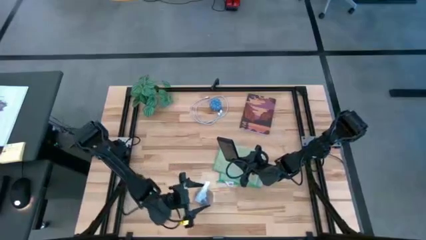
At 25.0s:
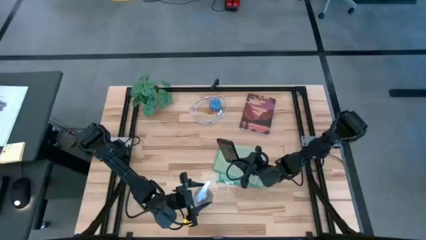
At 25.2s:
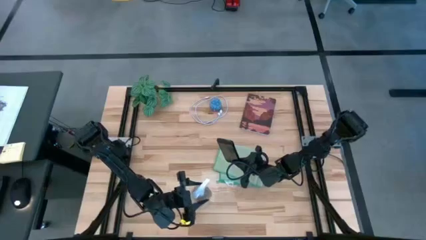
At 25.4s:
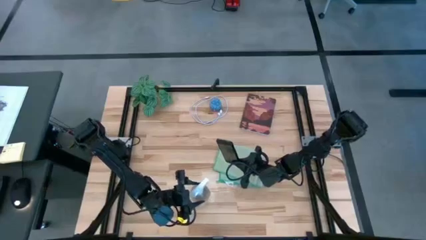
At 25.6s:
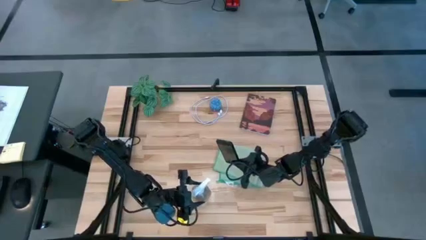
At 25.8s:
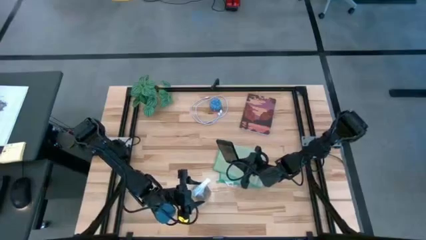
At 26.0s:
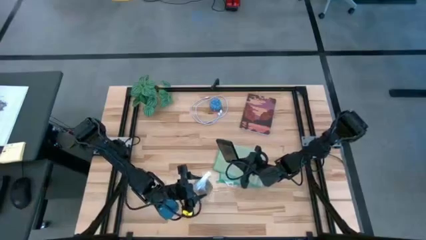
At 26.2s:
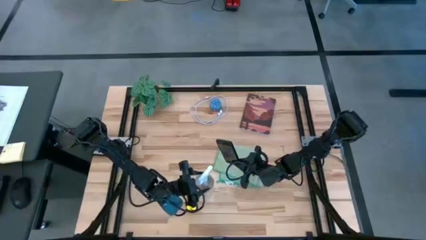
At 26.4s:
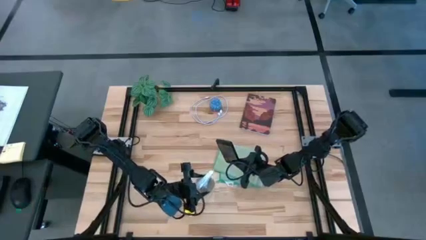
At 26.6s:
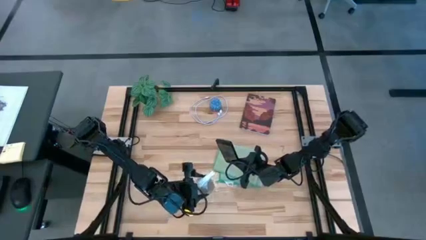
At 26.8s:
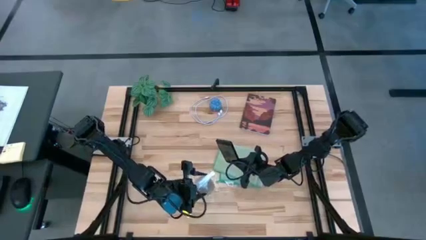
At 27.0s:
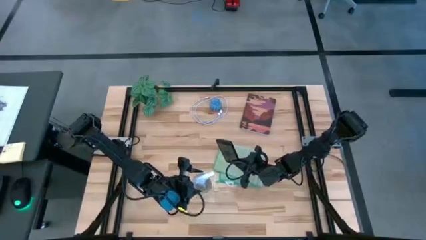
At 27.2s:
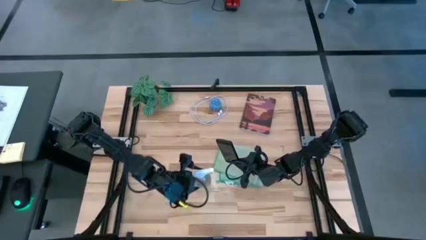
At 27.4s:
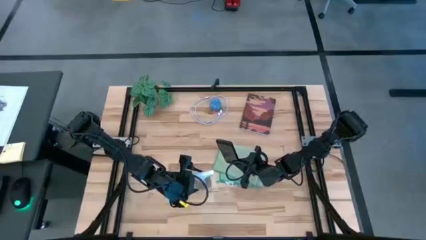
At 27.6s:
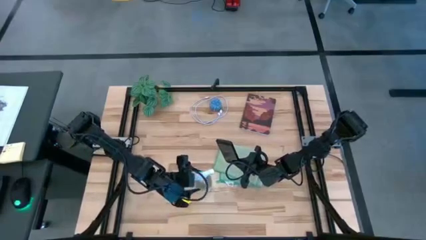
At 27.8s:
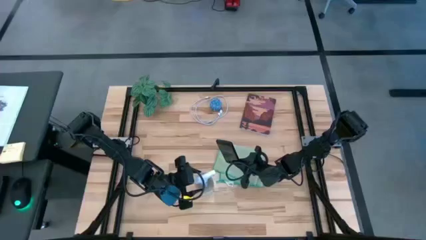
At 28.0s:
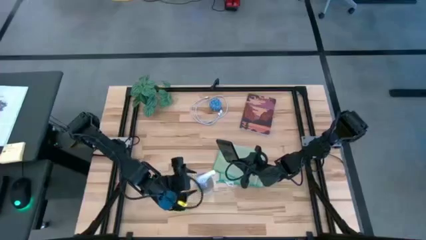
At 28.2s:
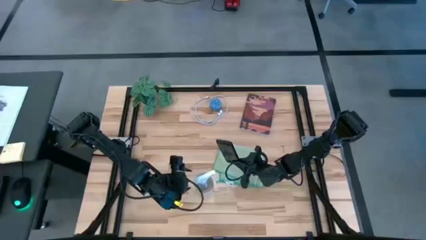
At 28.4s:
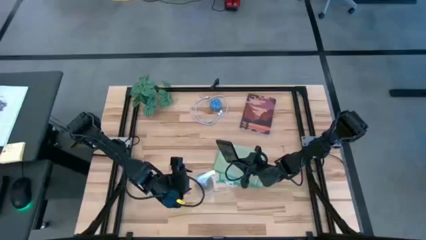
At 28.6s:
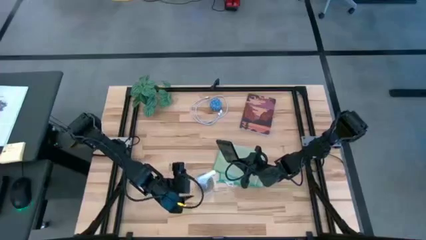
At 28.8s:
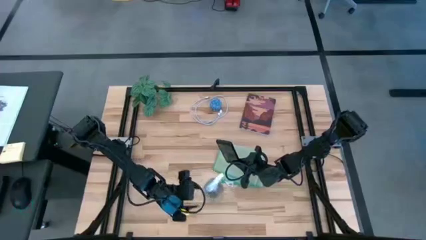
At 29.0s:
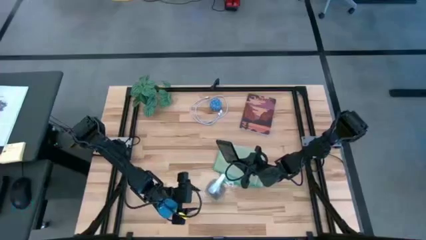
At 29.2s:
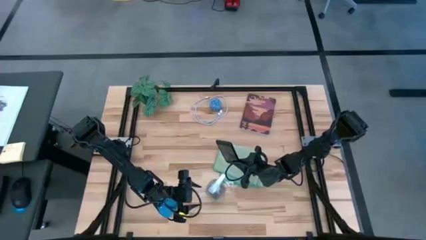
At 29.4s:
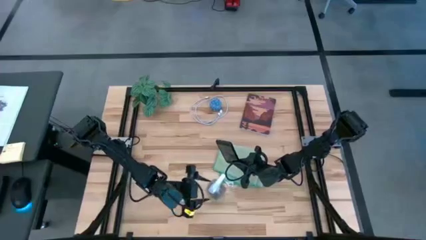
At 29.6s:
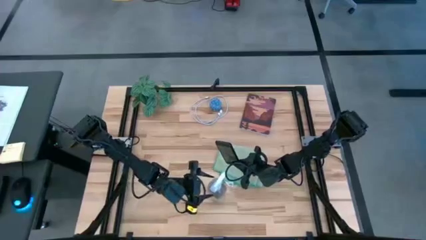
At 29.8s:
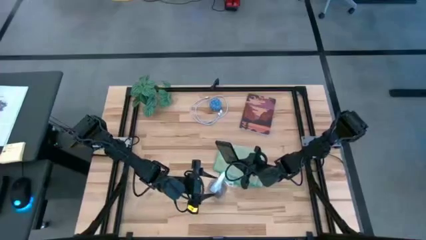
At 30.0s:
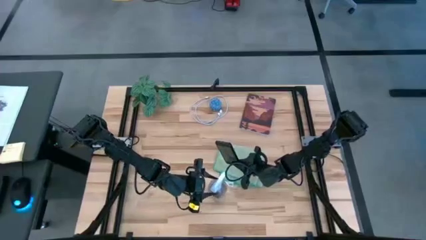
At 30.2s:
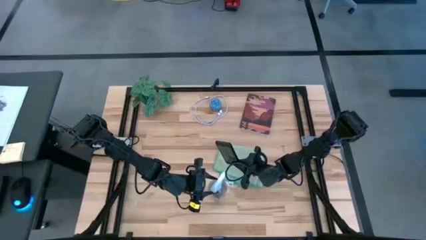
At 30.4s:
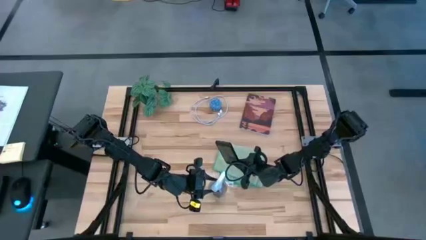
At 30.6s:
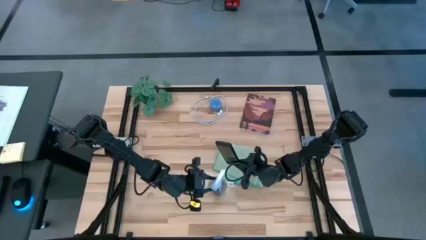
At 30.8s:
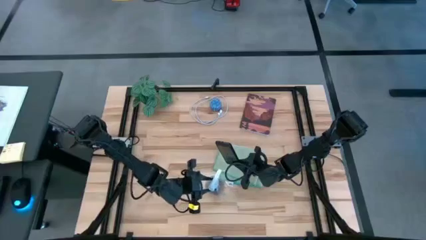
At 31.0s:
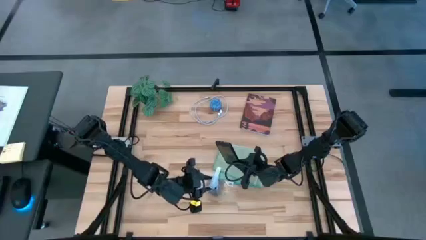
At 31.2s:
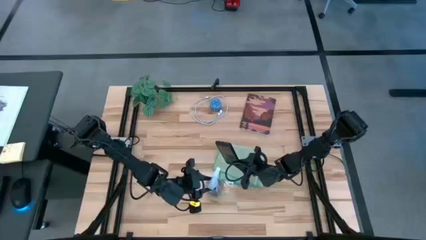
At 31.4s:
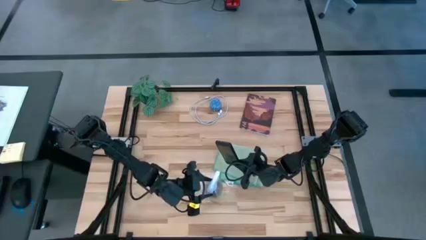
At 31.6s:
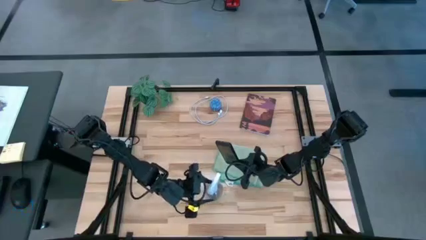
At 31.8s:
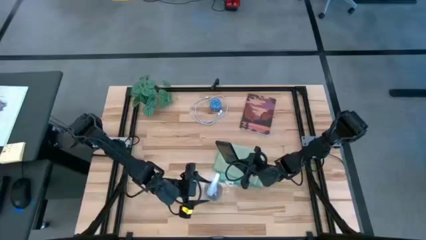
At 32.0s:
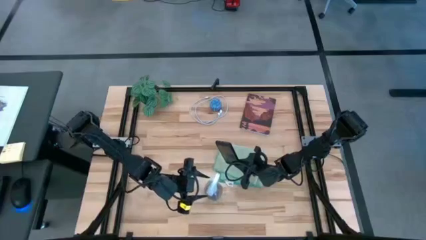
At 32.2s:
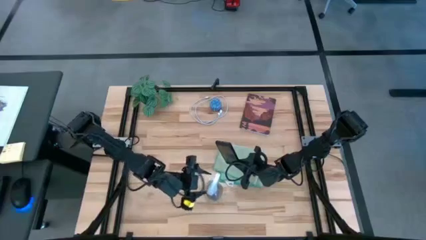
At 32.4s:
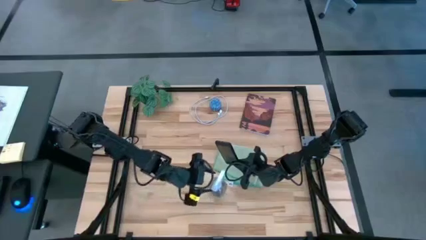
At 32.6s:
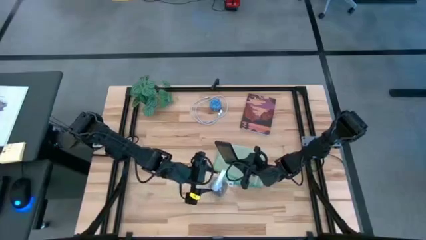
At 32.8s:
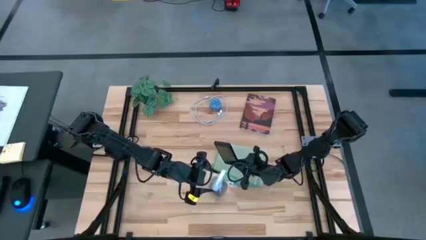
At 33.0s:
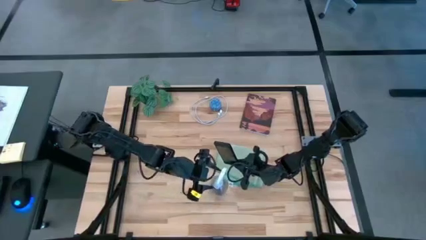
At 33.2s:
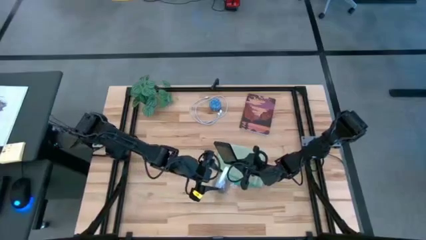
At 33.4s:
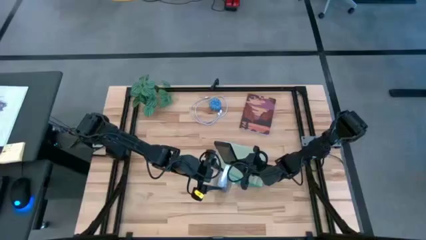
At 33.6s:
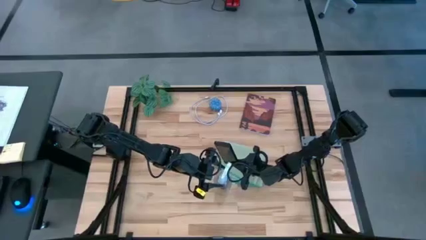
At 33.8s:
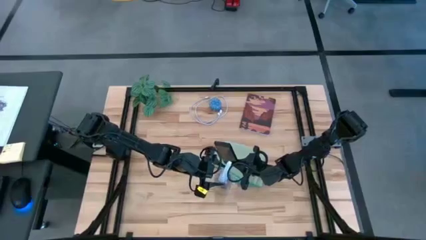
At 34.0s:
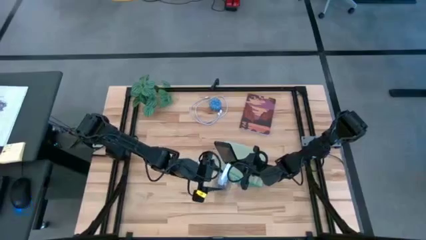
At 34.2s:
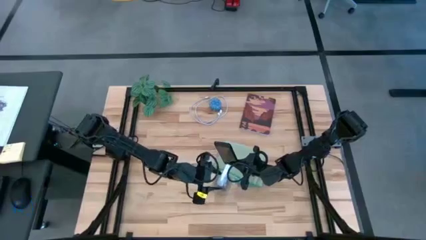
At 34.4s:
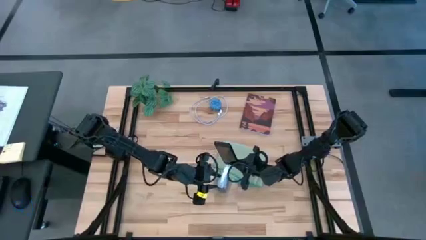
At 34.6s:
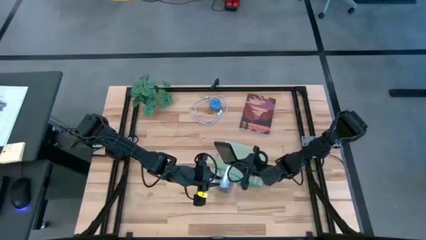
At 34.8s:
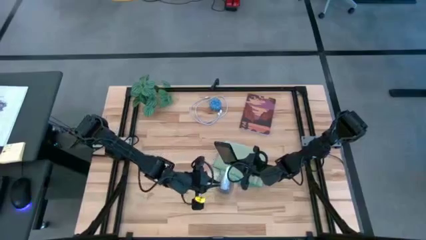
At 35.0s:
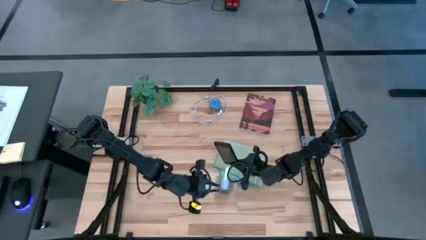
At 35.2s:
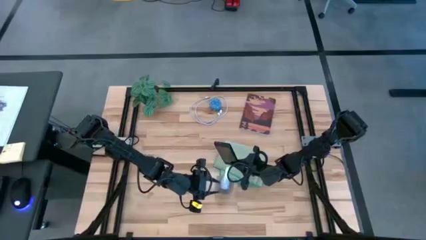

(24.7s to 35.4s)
Task: Apply microfiber cloth
Spray the front of the black cellphone with the spray bottle

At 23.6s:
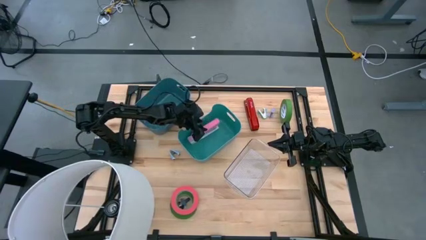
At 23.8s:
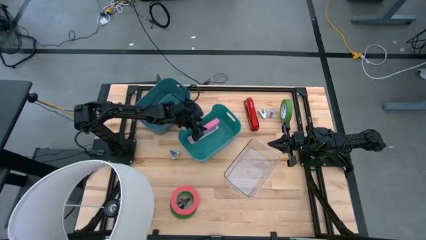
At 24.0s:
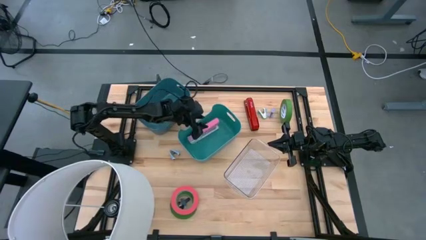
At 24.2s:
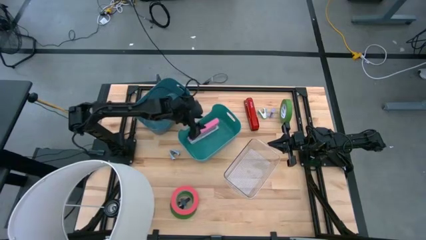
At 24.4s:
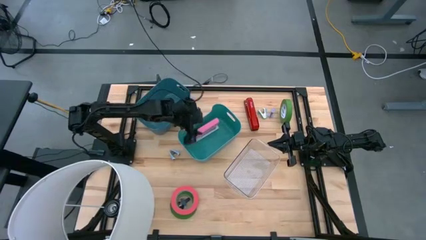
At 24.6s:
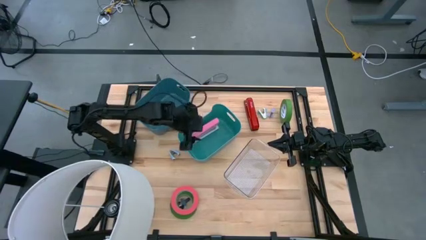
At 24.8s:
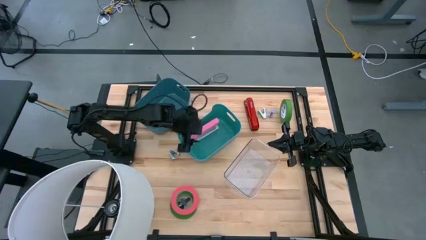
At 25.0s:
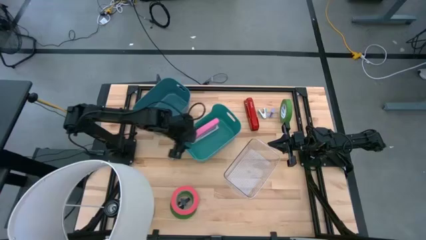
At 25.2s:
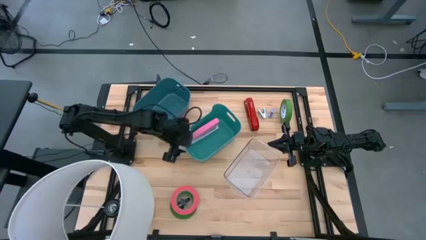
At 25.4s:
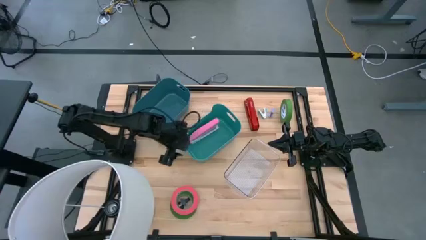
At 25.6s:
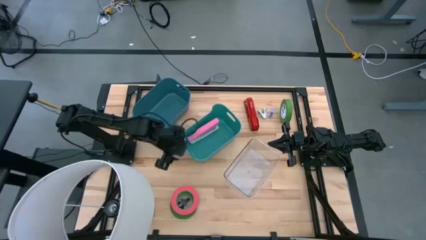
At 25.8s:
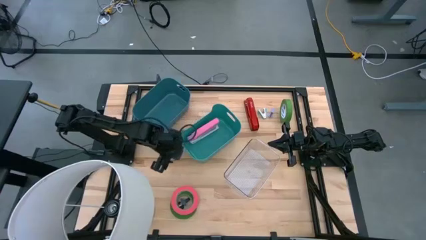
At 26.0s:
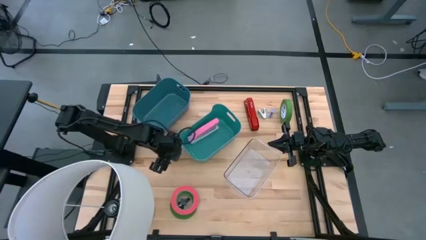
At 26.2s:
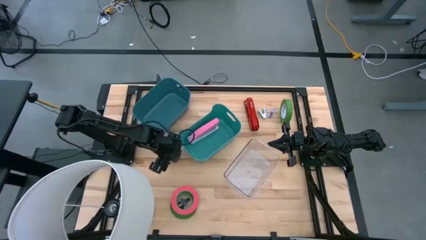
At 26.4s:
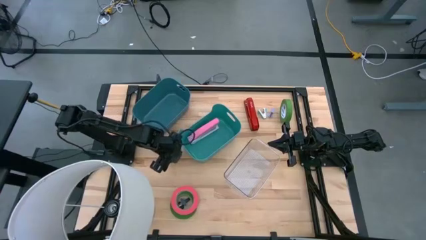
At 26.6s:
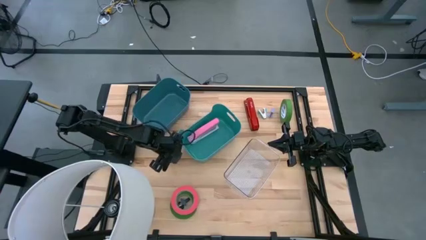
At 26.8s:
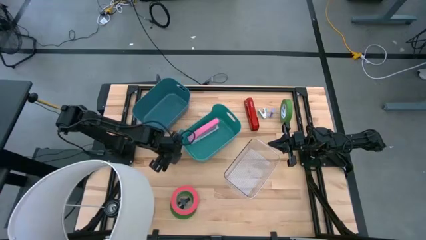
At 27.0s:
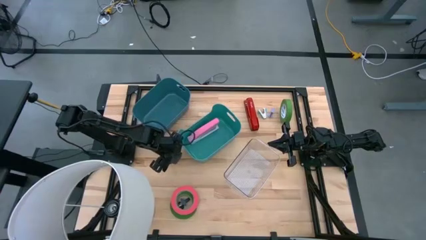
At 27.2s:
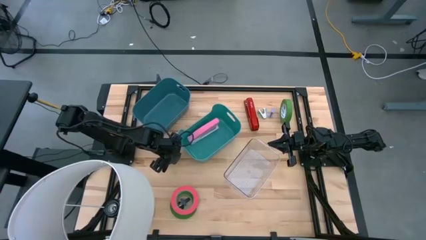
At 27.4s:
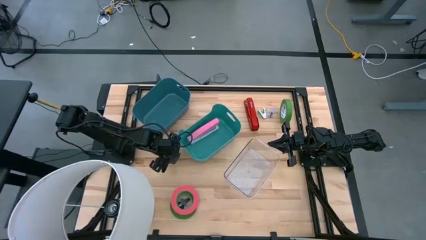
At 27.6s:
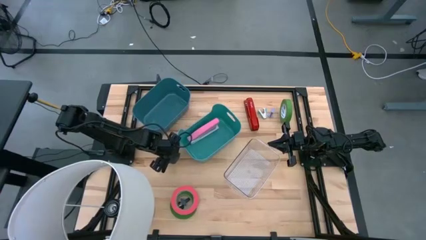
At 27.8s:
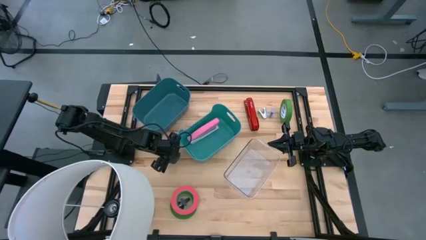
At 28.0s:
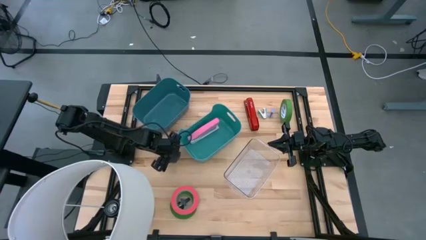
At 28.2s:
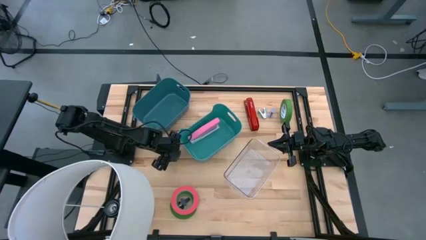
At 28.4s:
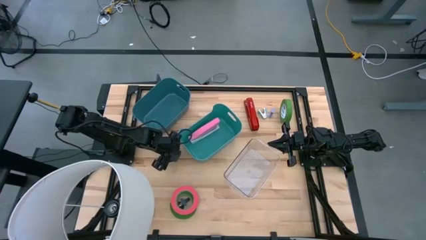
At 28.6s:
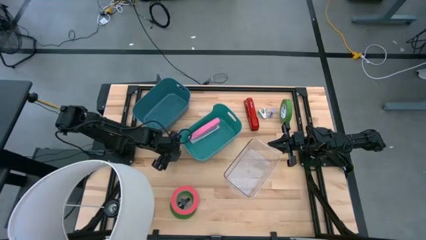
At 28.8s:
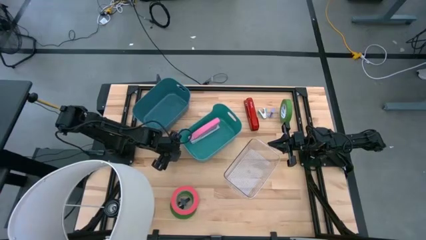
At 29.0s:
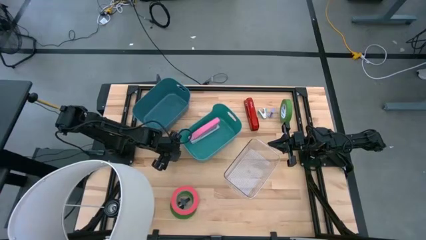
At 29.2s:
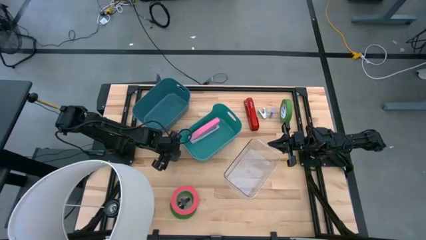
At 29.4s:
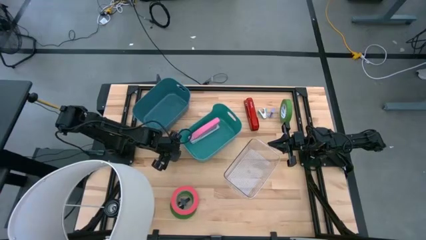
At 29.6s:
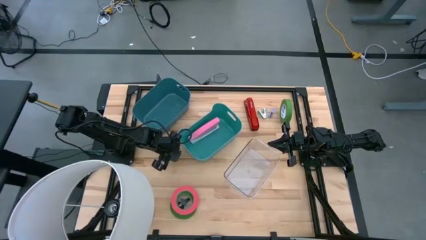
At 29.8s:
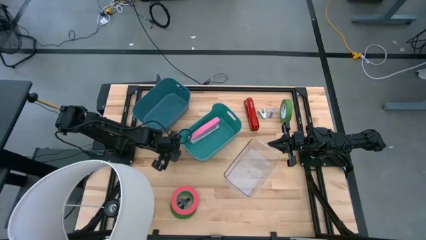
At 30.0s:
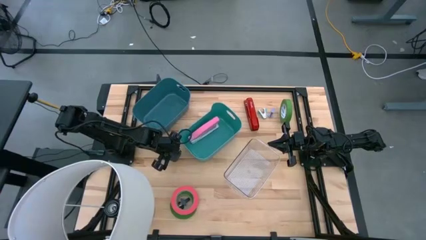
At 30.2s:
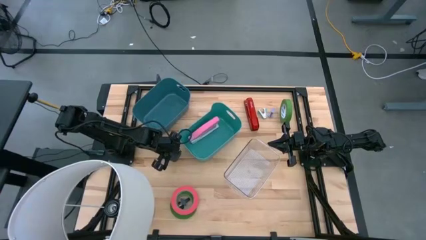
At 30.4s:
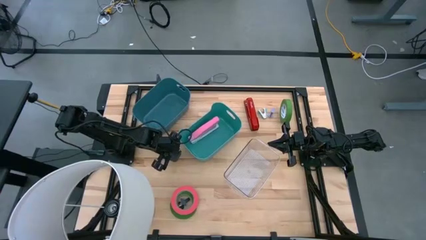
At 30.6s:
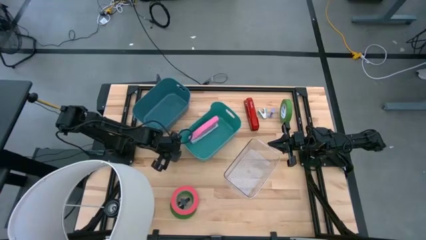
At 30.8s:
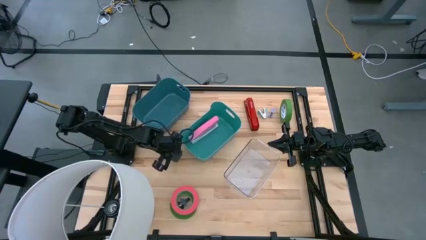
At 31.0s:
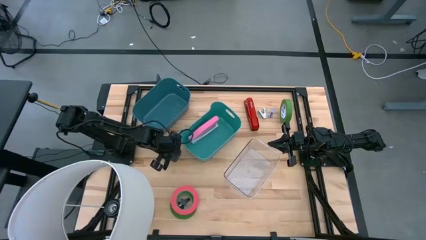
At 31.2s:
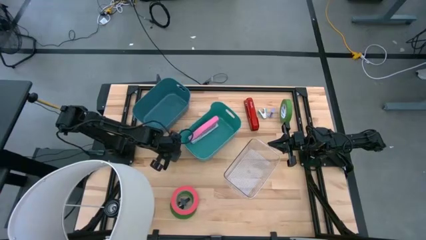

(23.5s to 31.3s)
Task: Pick and place Stapler, Stapler remover, tape
Put the blue staple remover into the blue bin
